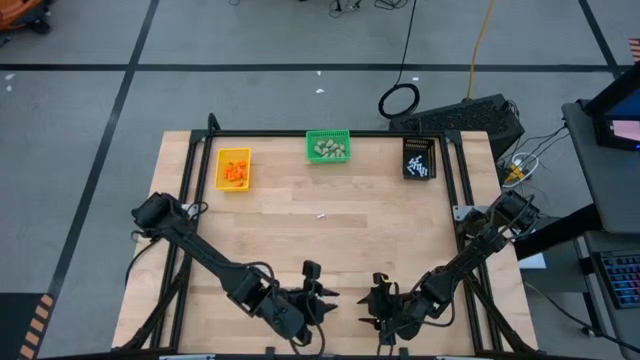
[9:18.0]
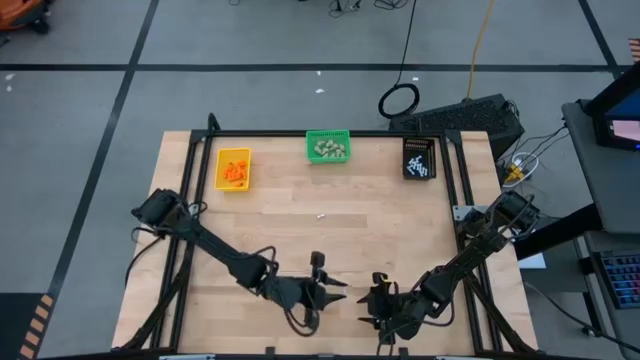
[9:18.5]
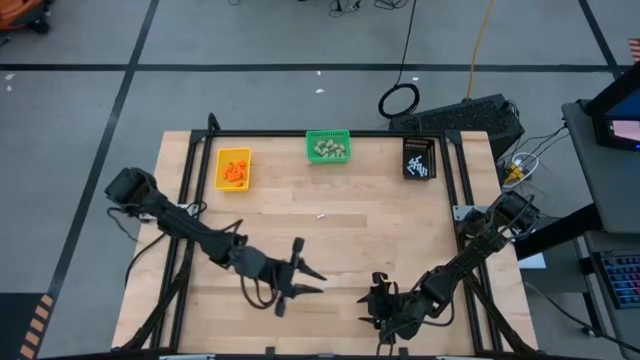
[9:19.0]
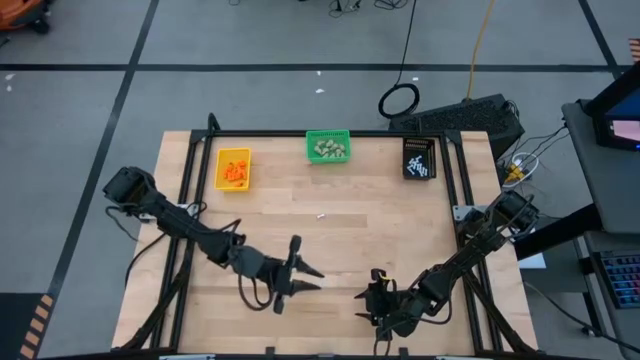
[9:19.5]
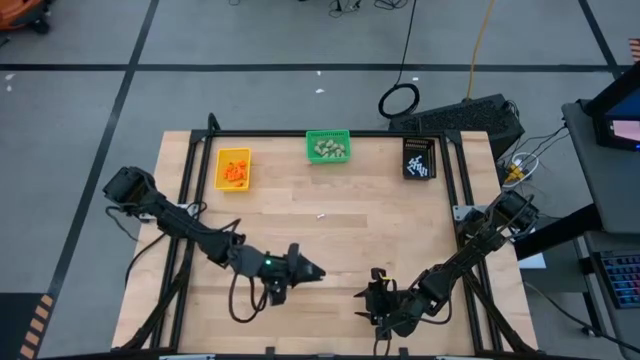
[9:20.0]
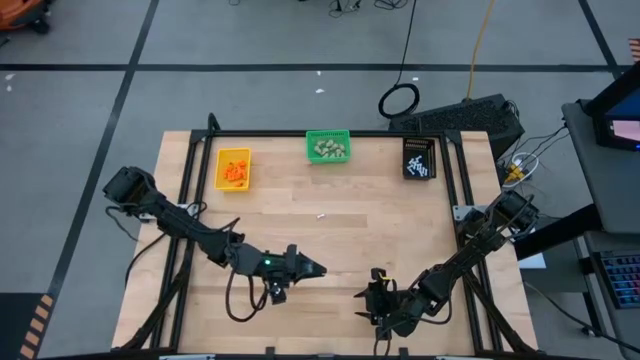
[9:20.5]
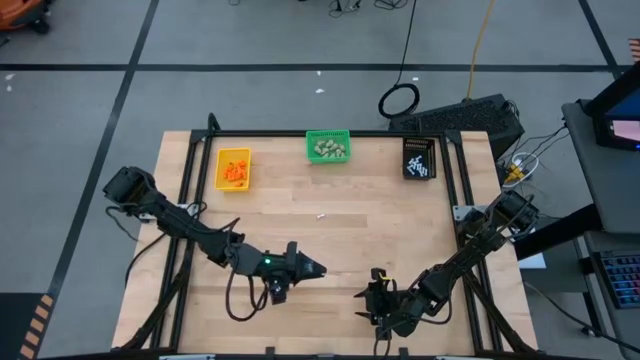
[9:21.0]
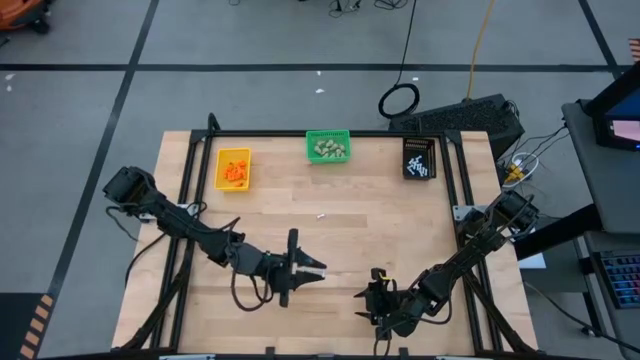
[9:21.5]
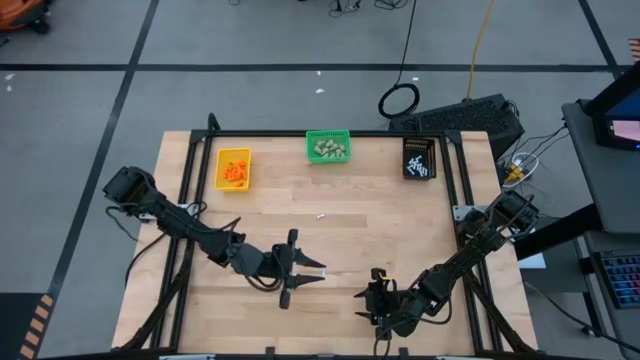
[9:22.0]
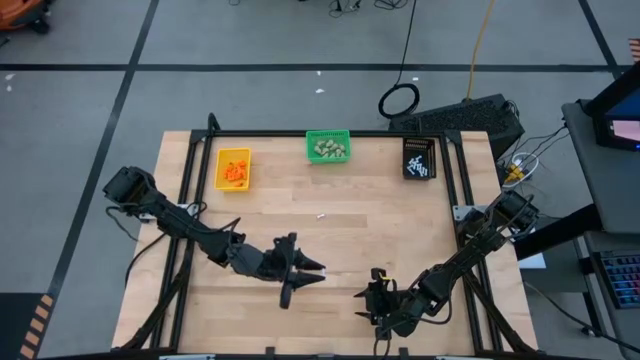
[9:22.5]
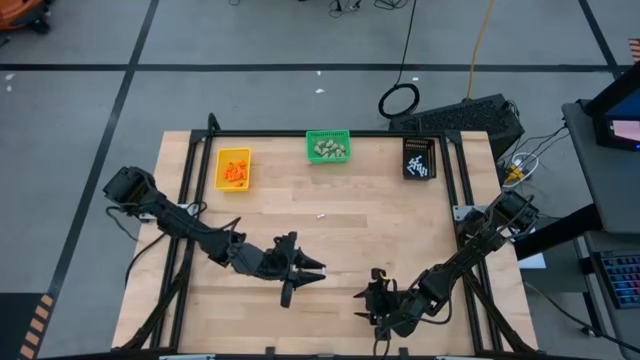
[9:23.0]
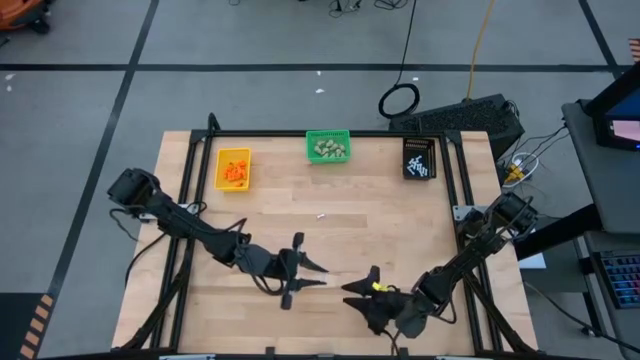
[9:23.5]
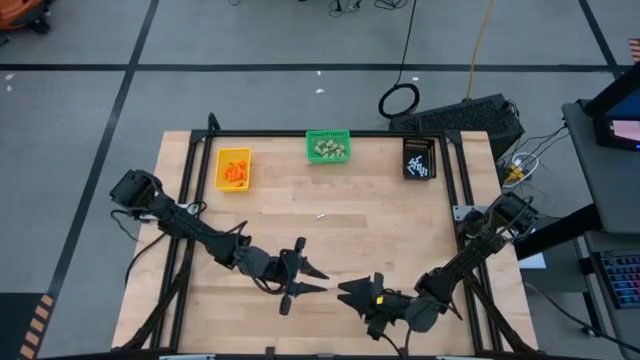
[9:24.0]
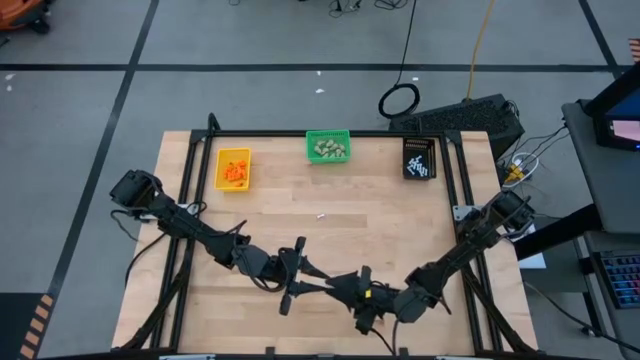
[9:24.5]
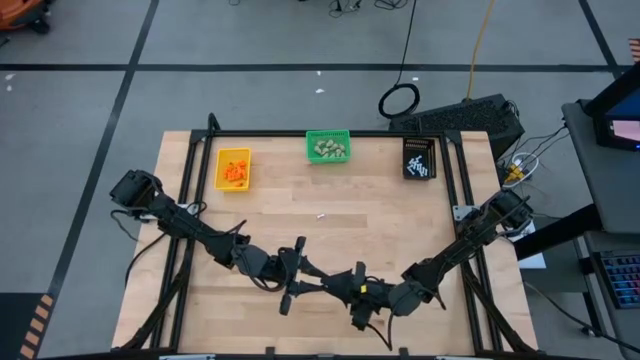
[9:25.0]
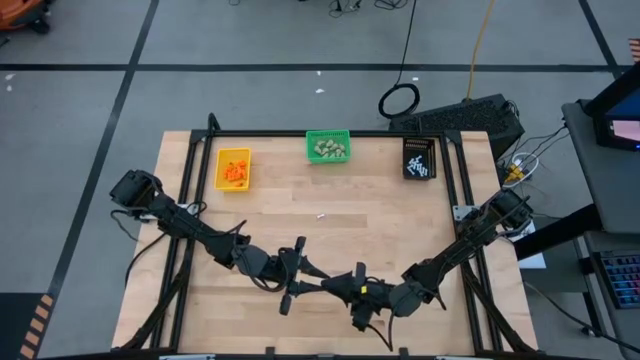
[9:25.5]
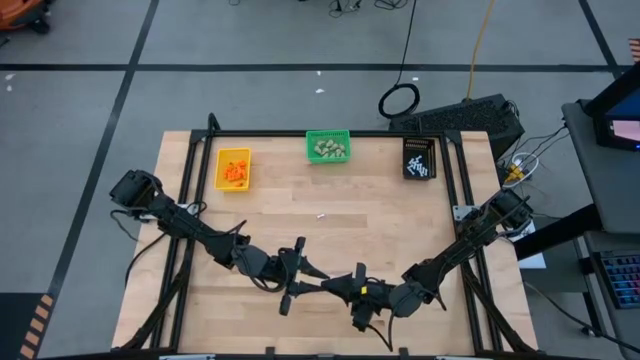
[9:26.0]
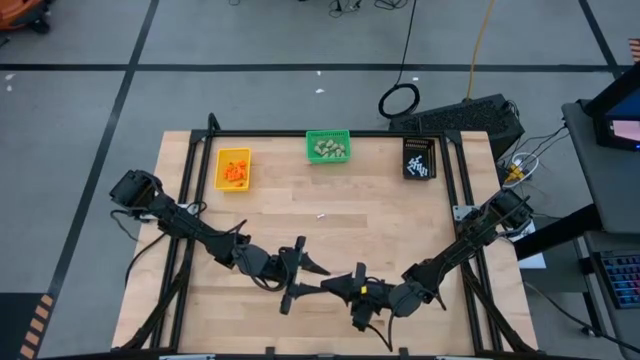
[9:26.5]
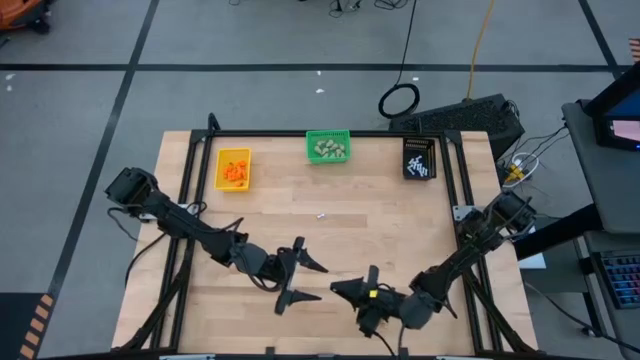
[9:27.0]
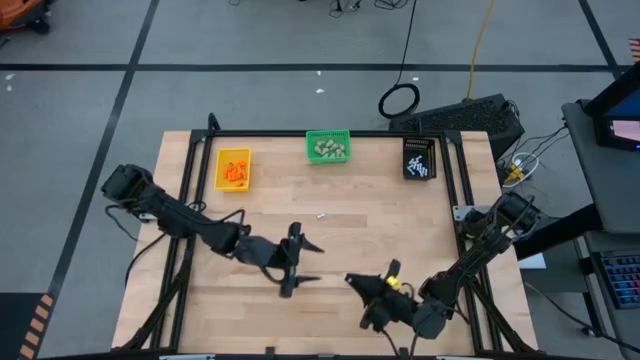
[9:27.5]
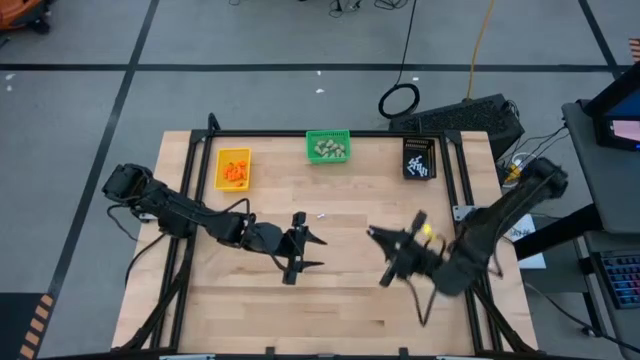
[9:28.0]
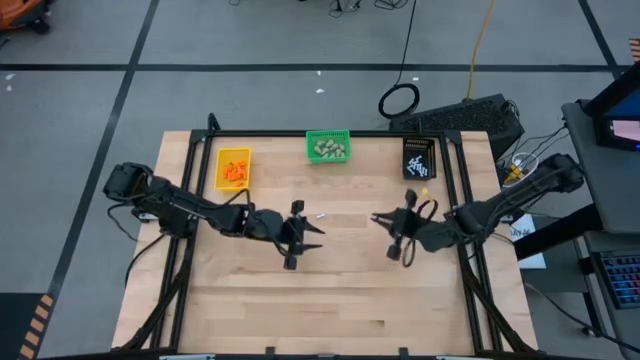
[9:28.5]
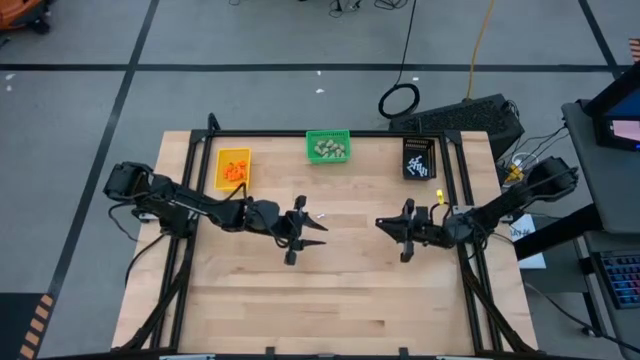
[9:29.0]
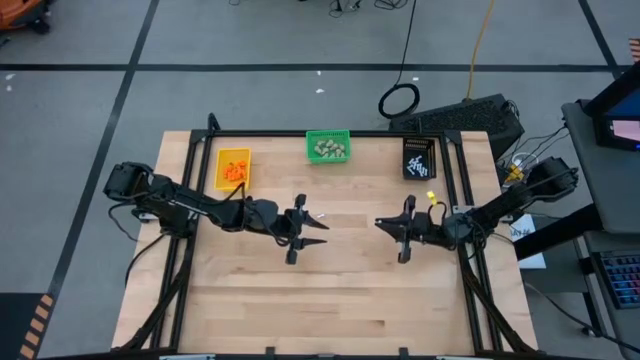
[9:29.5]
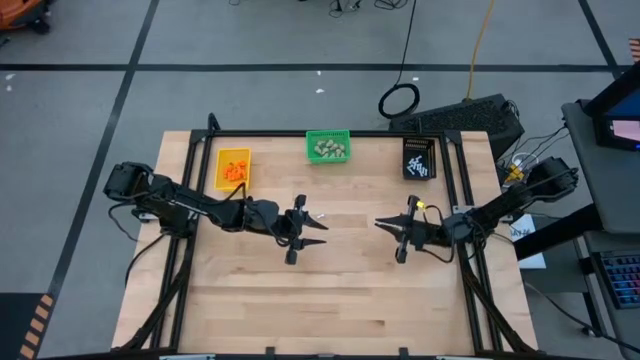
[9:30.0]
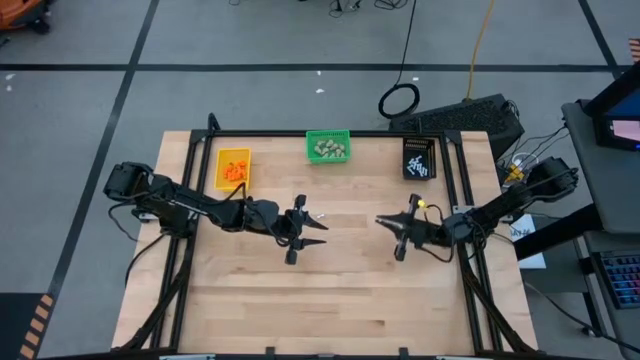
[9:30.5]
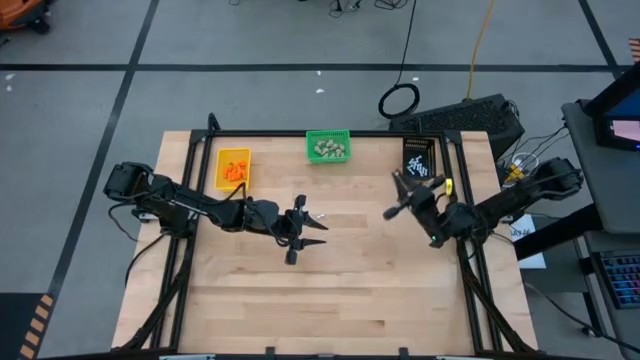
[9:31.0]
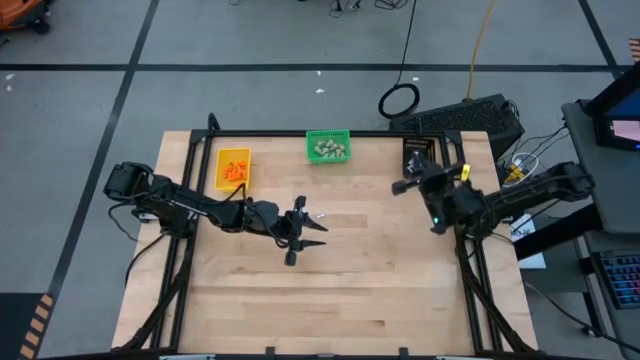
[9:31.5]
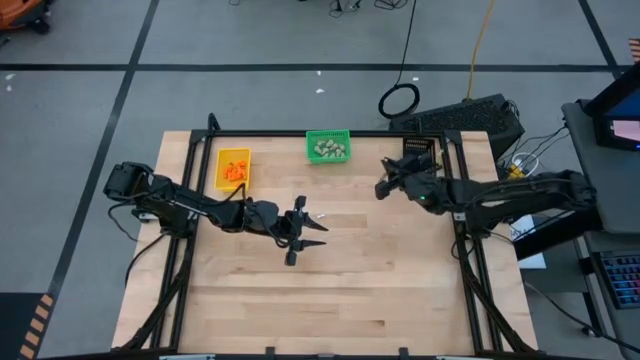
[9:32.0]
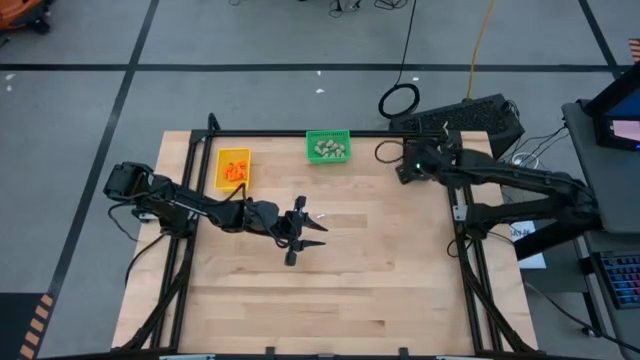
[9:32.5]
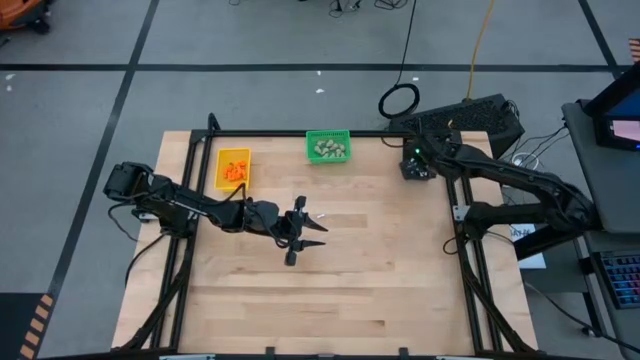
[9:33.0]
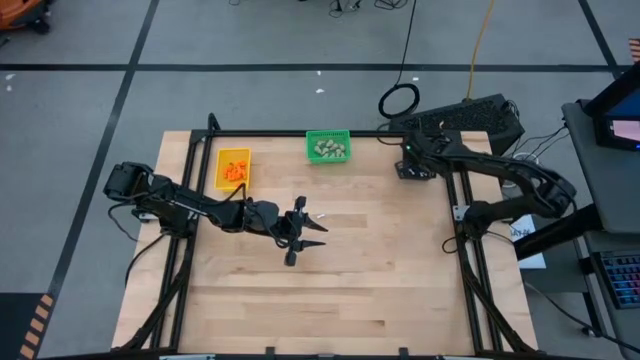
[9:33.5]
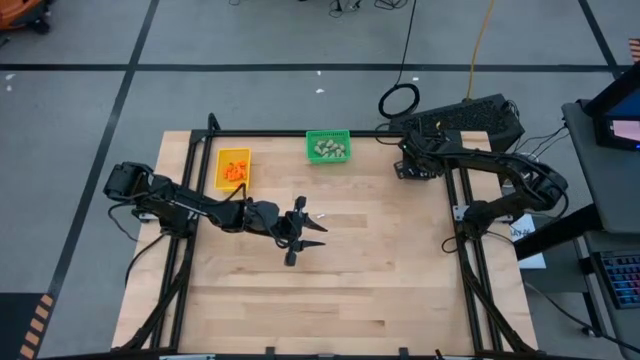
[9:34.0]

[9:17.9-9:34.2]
Task: Sort Halloween decoration
Put the white bone toy into the black bin

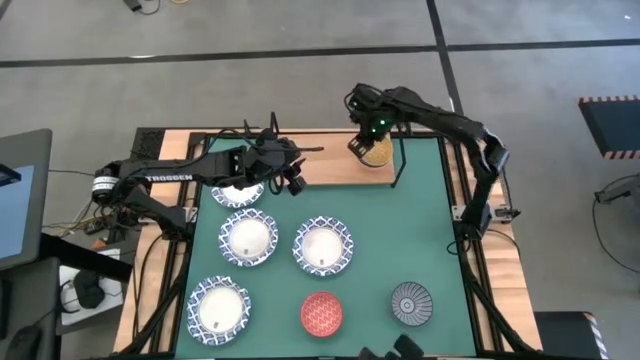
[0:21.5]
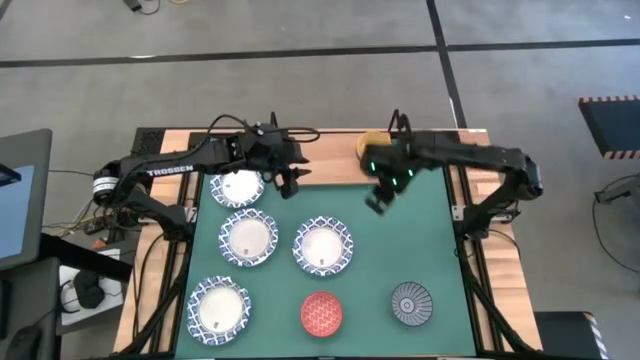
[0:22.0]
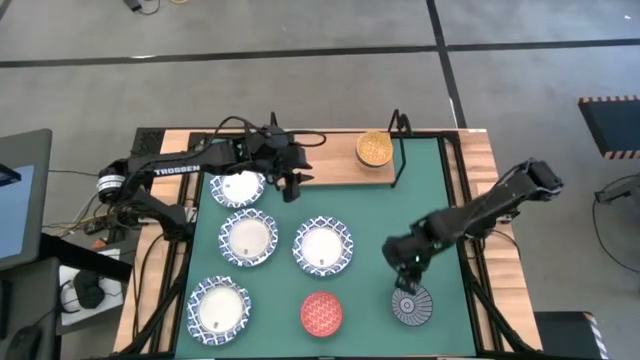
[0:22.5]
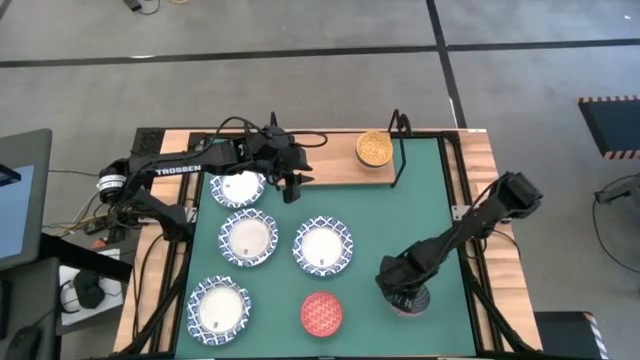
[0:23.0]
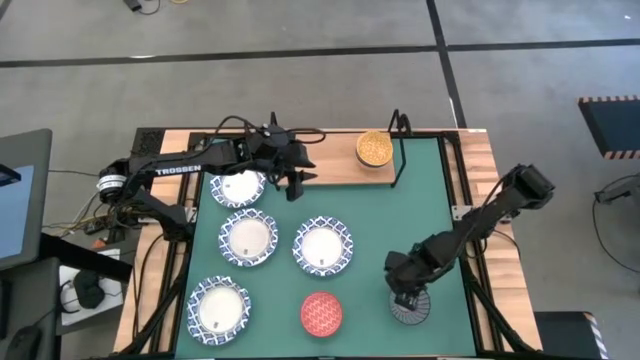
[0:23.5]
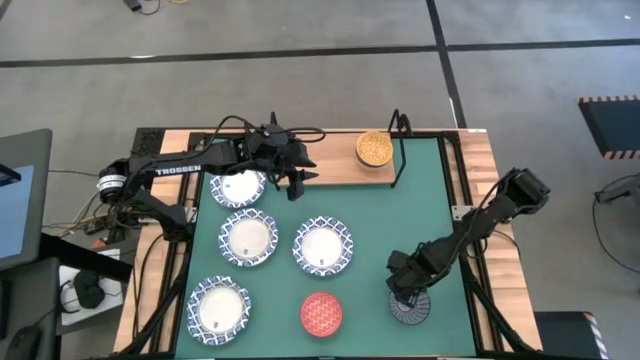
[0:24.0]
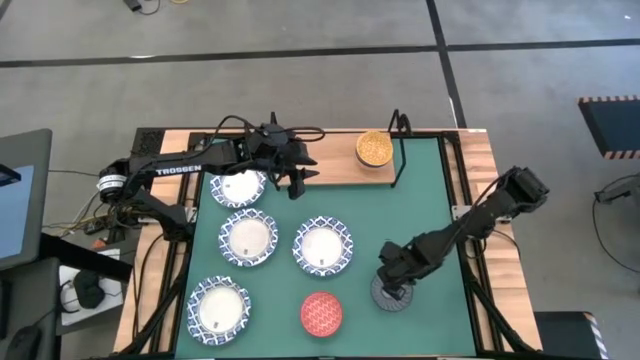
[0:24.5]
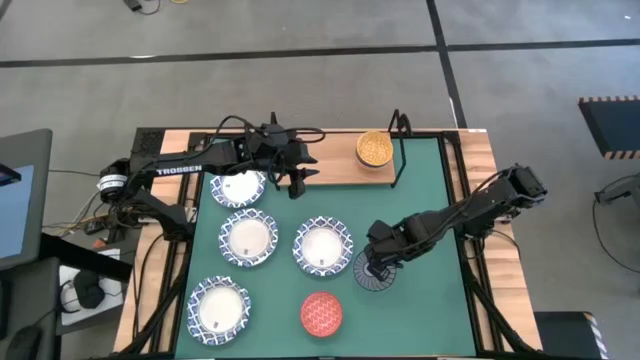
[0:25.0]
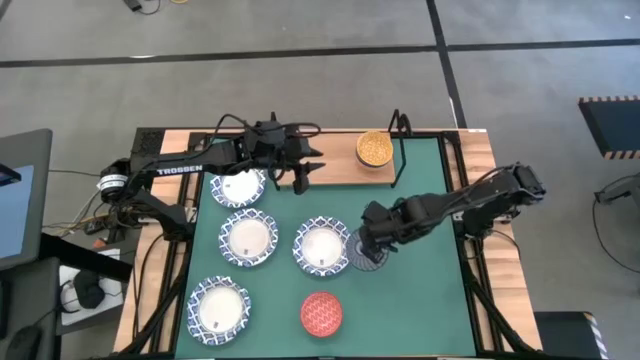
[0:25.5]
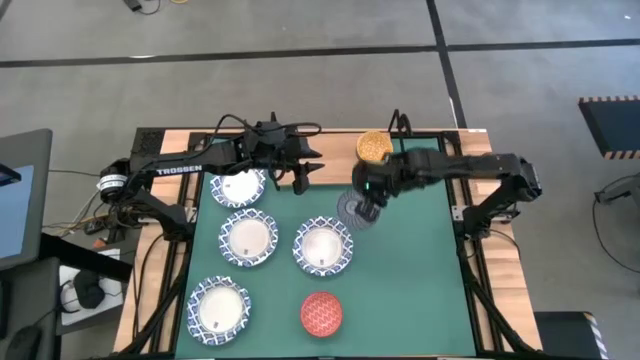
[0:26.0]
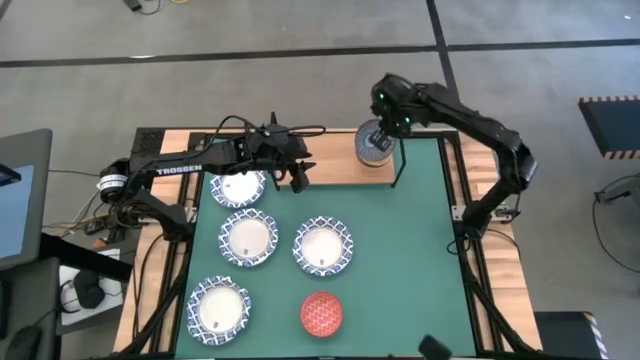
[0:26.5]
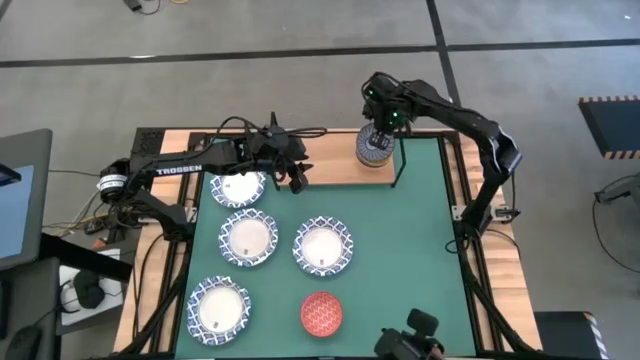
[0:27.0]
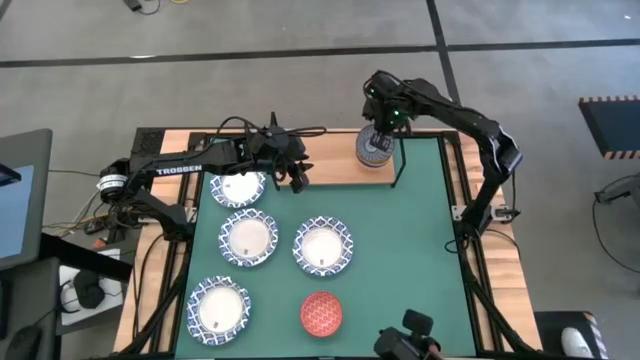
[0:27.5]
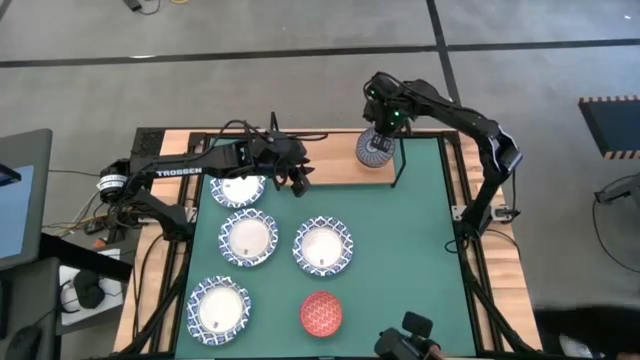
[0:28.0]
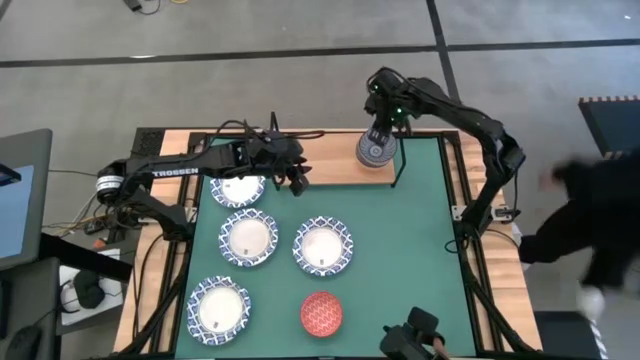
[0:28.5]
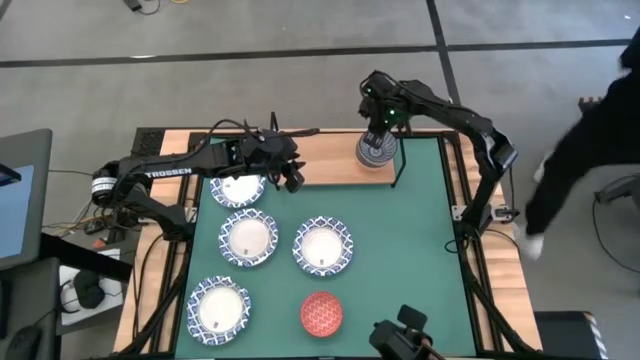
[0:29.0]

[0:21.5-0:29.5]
Task: Place and stack bowls onto a shelf
Stack the dark blue ceramic bowl on top of the yellow ceramic bowl on the shelf
